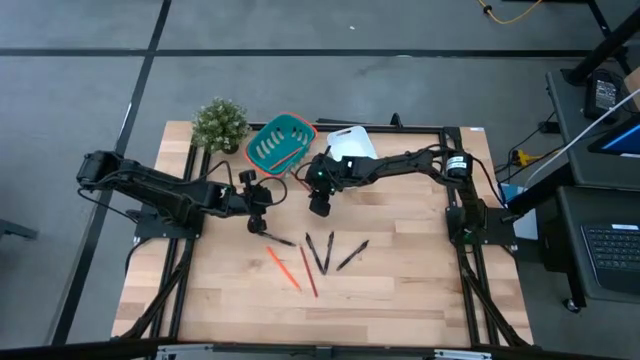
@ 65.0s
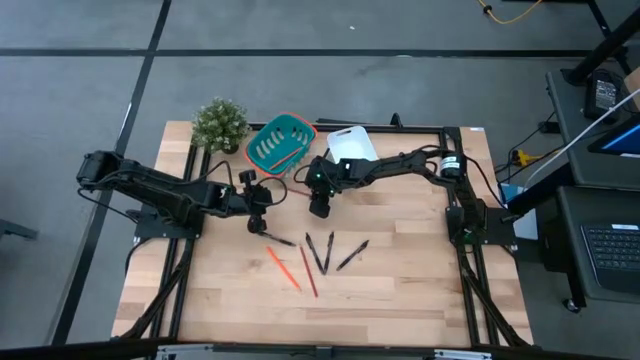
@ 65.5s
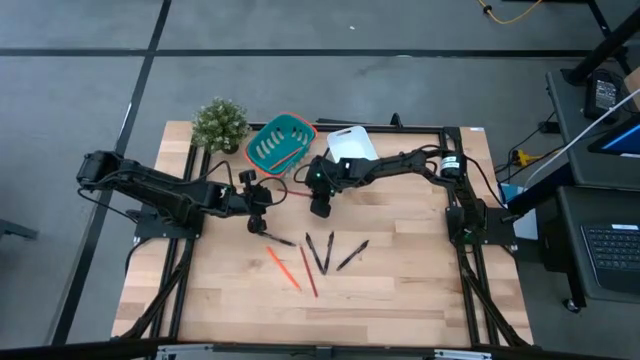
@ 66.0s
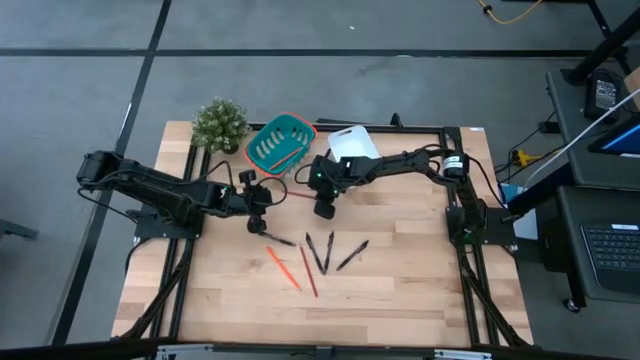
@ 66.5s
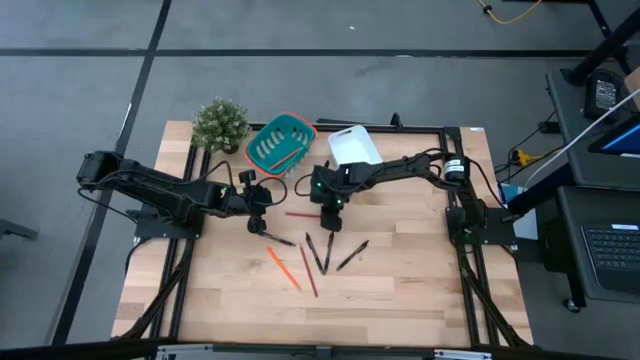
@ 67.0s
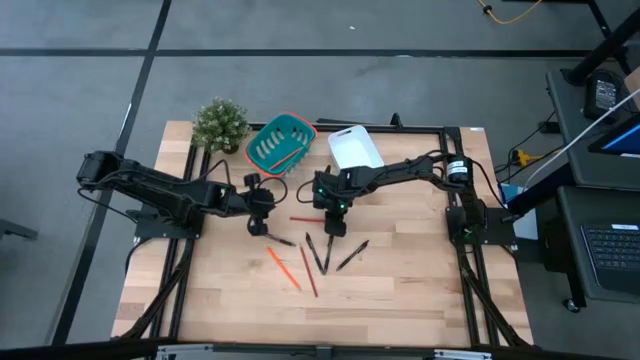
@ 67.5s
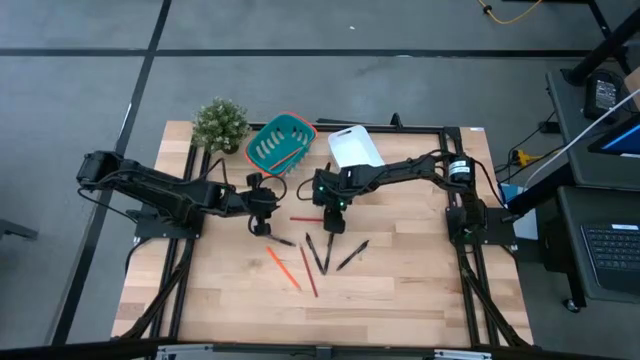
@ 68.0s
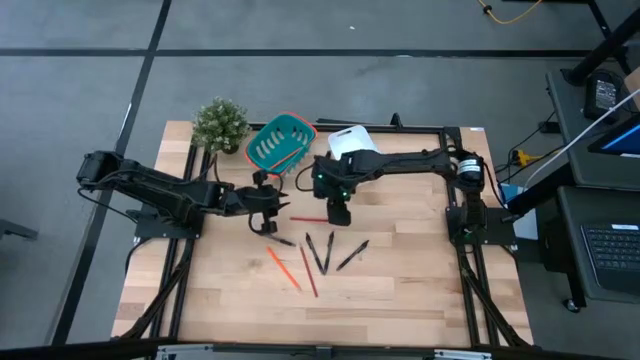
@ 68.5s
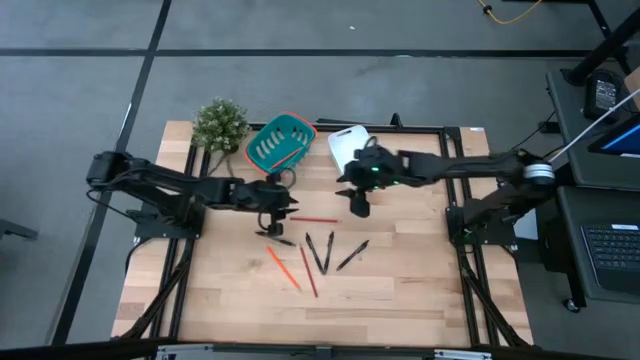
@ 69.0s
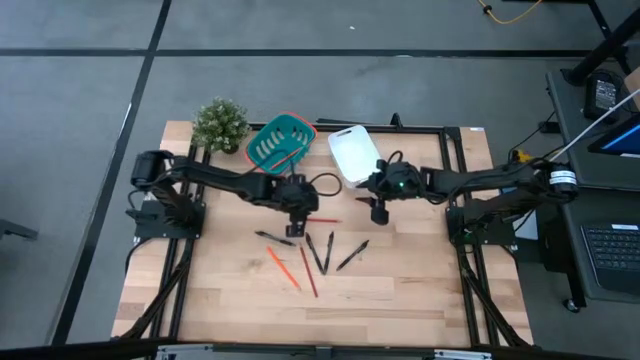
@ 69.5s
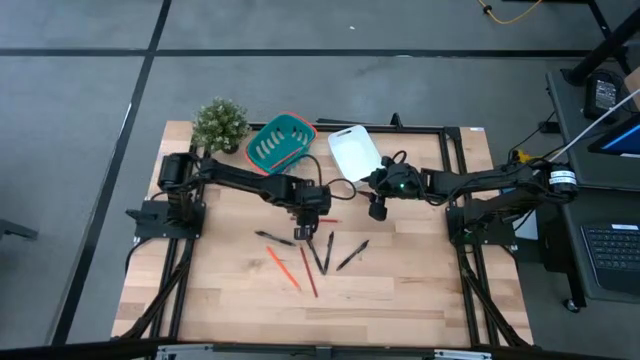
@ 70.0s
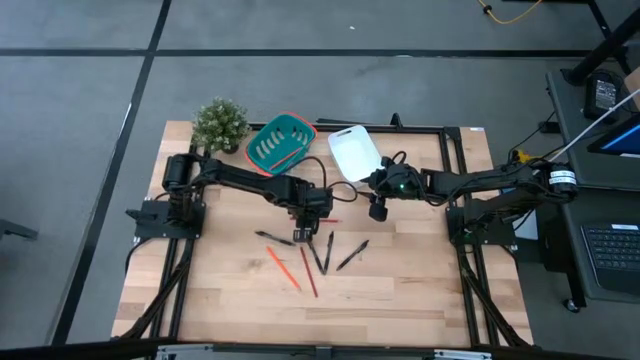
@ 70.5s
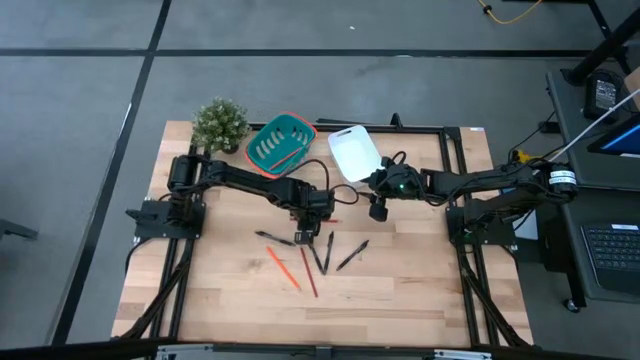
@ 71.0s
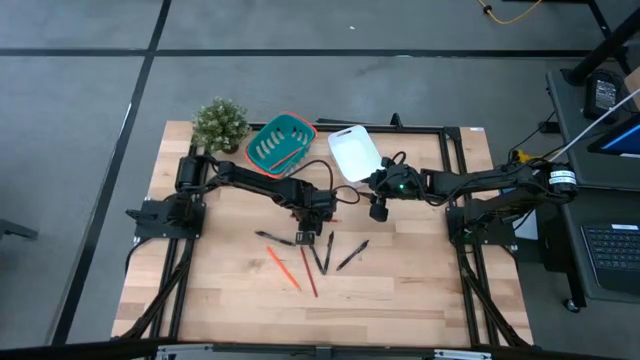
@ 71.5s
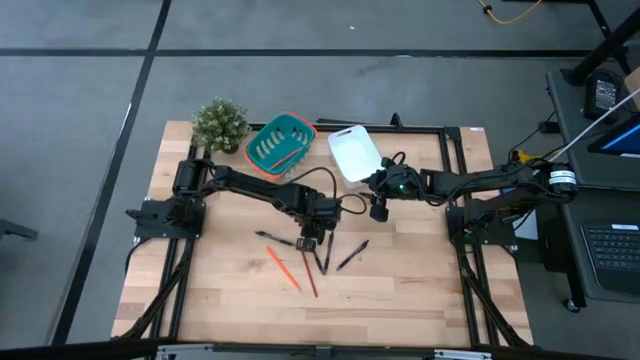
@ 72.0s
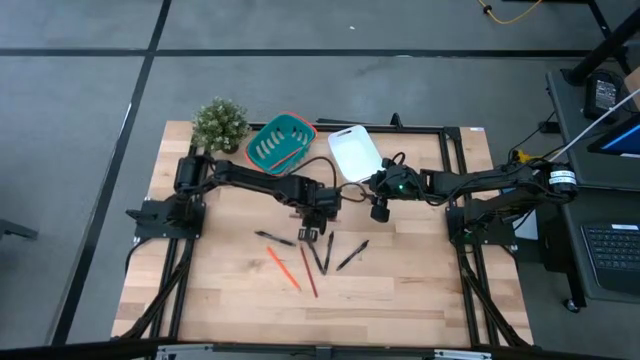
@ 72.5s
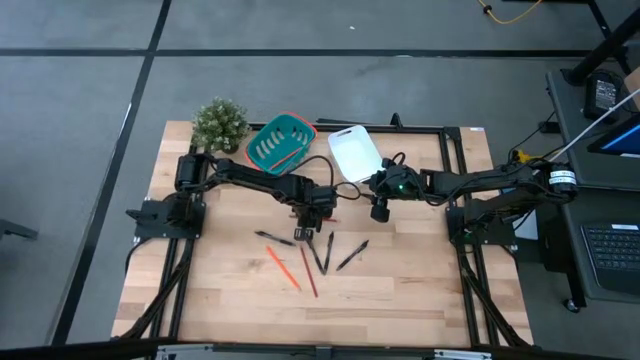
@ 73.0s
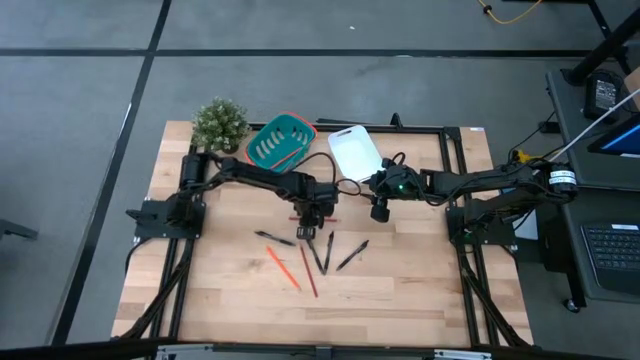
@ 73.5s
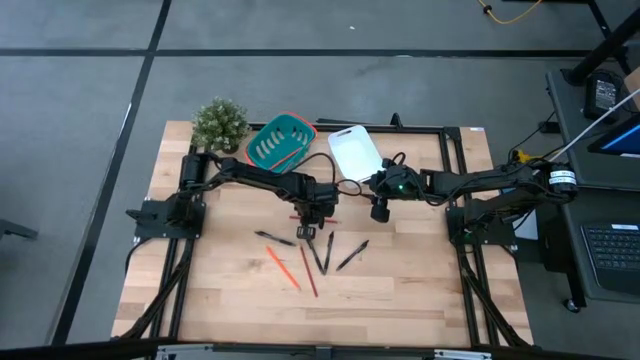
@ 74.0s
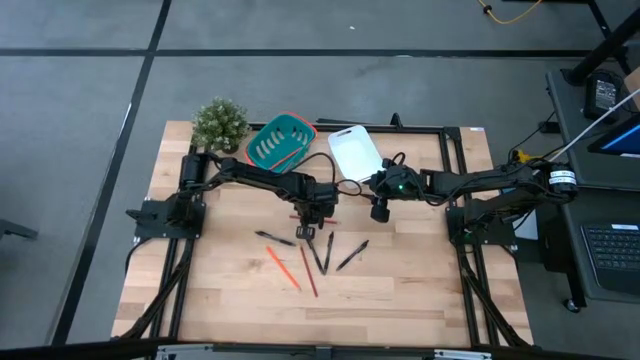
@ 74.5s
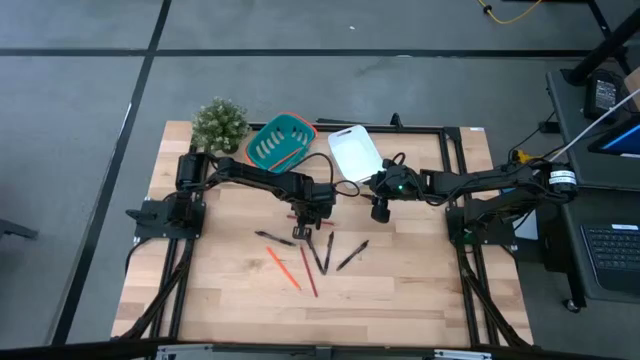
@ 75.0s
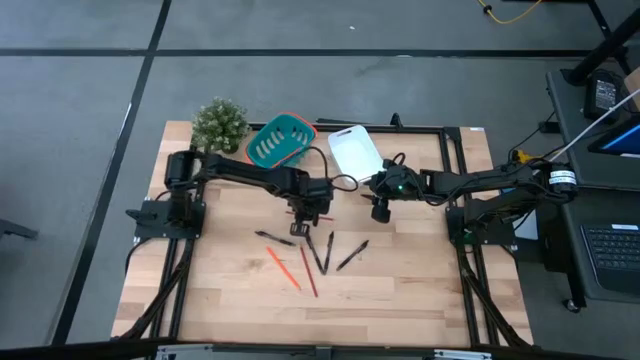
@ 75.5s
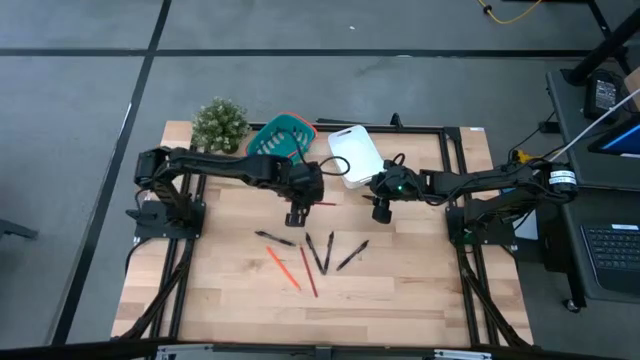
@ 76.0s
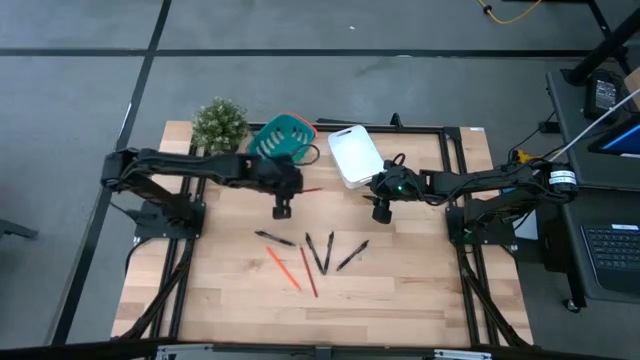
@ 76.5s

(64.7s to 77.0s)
Task: Sort pens & pencils
Put the red pencil into the green basket

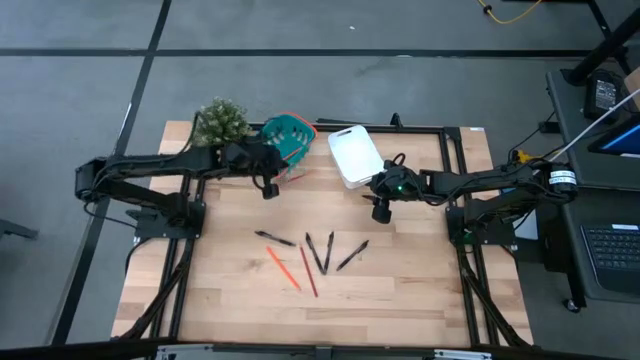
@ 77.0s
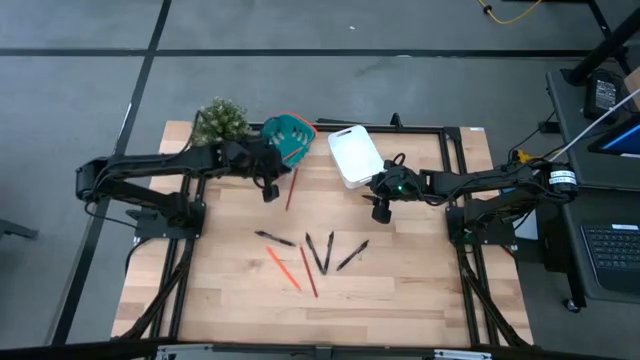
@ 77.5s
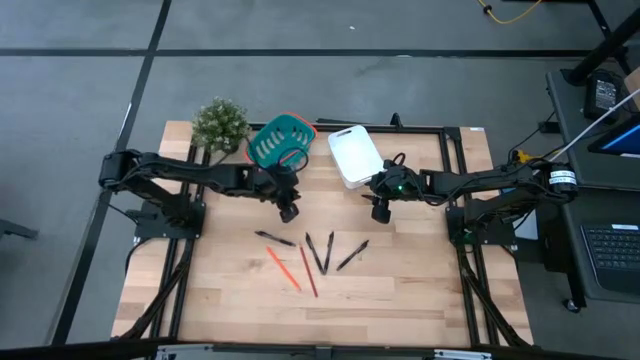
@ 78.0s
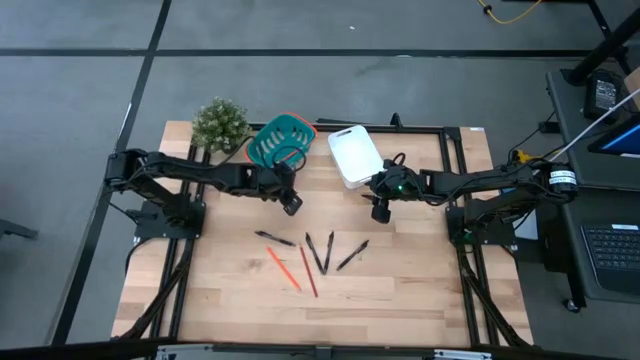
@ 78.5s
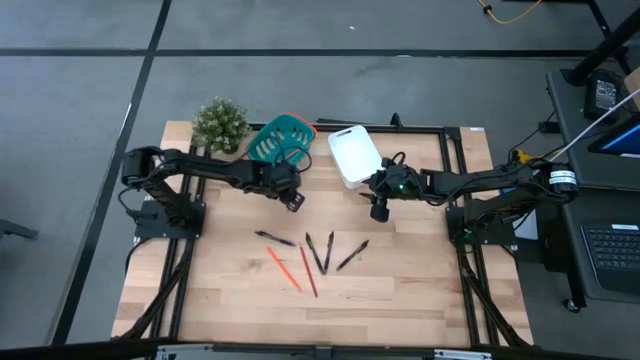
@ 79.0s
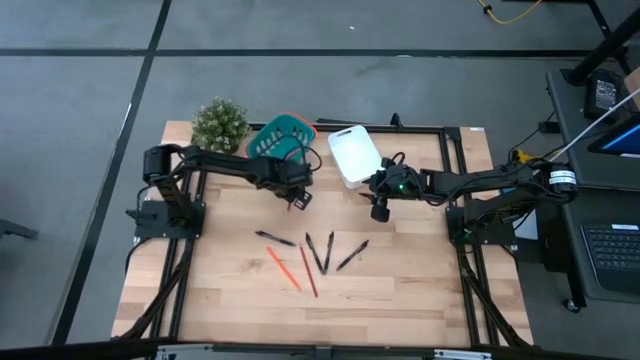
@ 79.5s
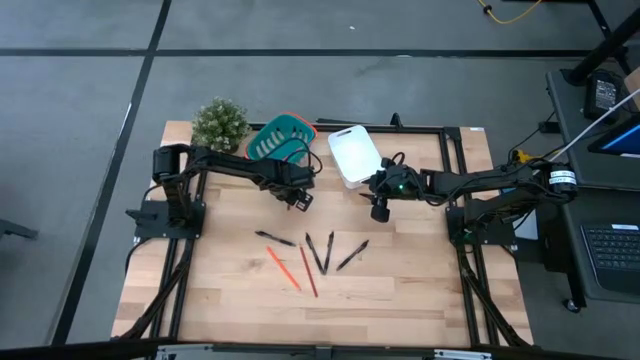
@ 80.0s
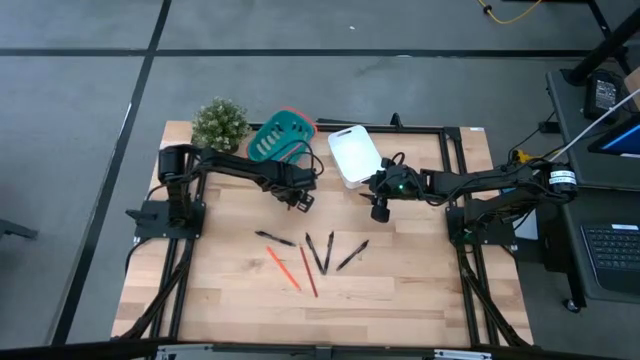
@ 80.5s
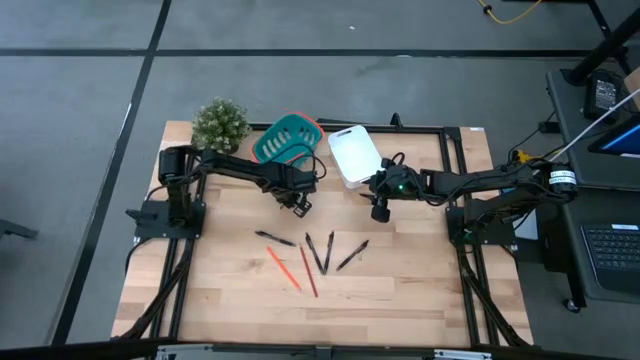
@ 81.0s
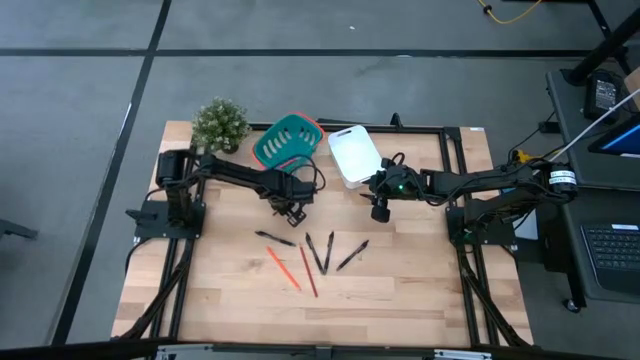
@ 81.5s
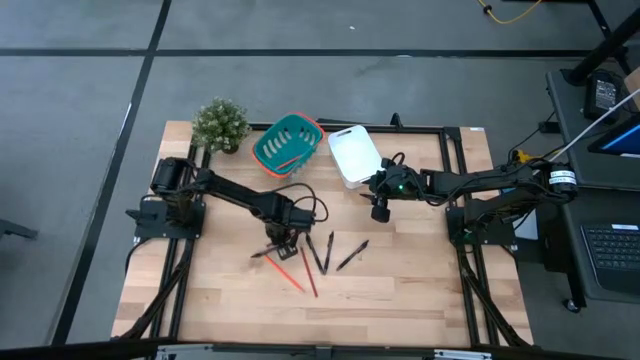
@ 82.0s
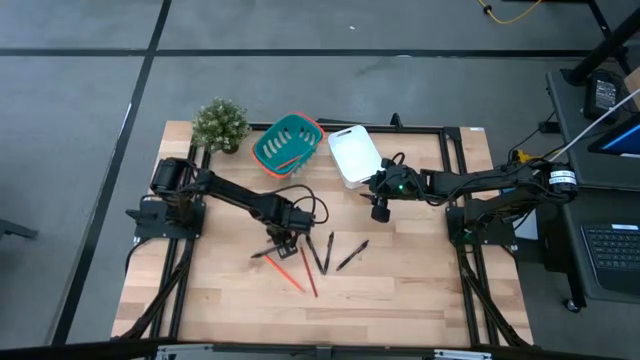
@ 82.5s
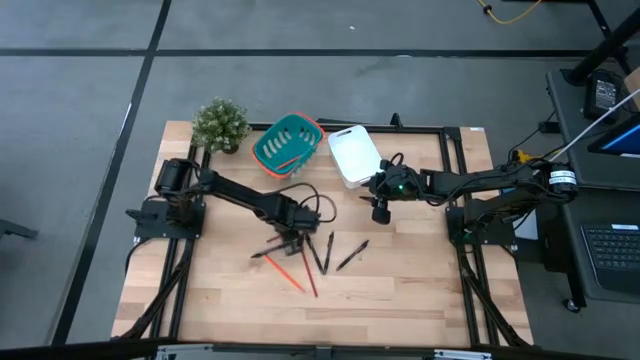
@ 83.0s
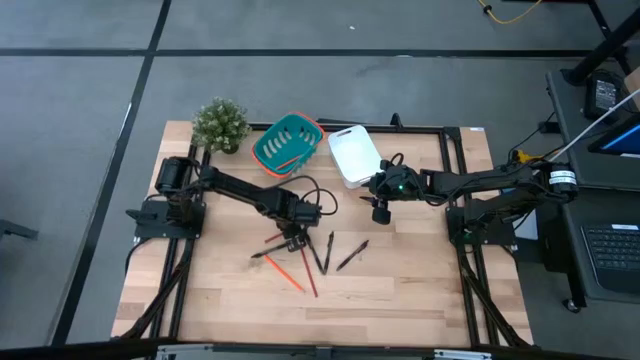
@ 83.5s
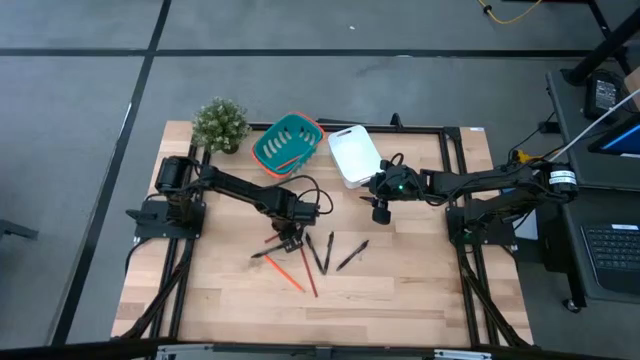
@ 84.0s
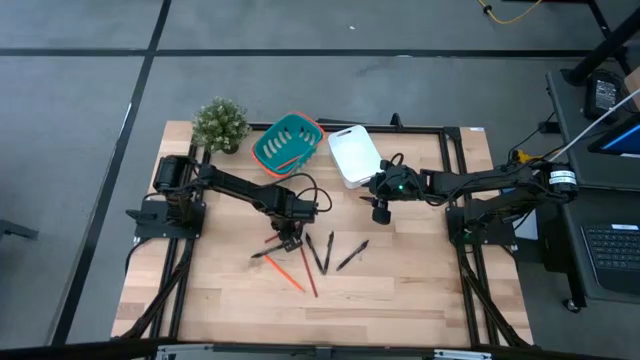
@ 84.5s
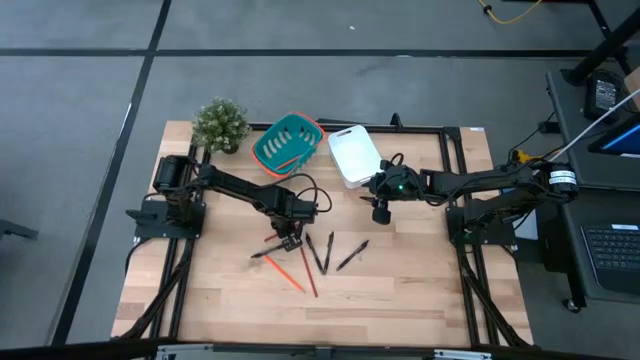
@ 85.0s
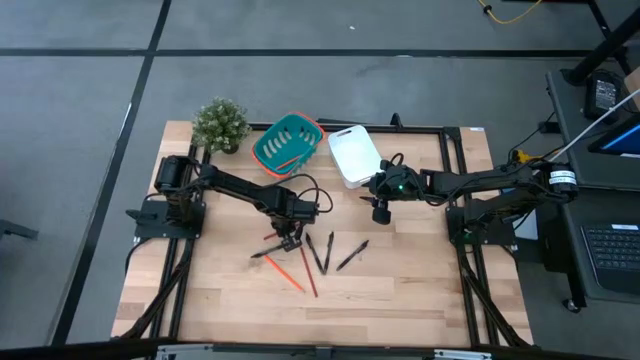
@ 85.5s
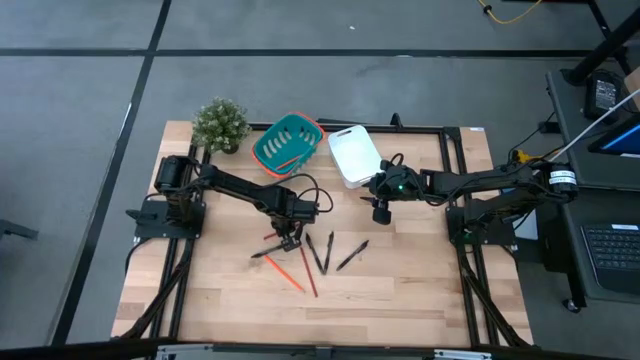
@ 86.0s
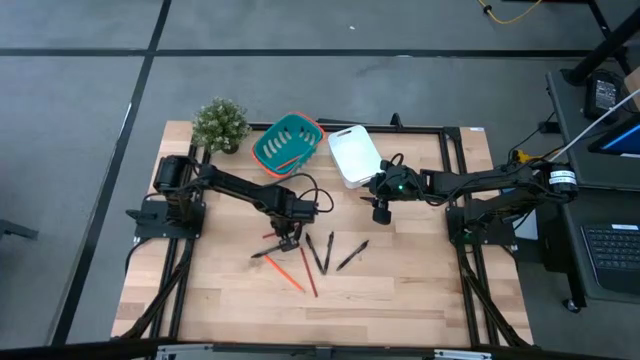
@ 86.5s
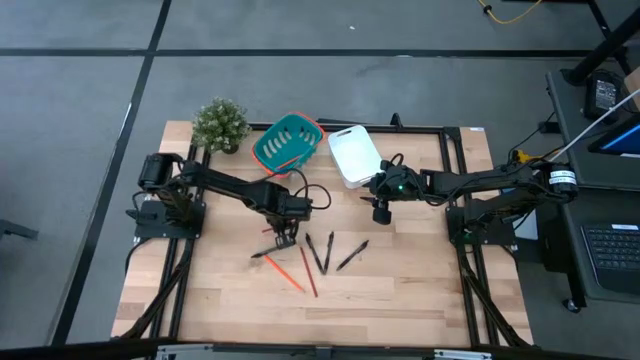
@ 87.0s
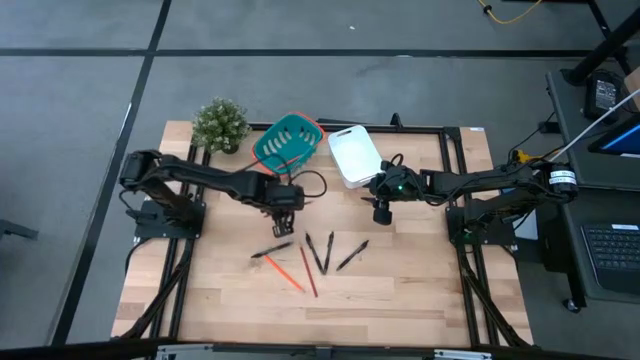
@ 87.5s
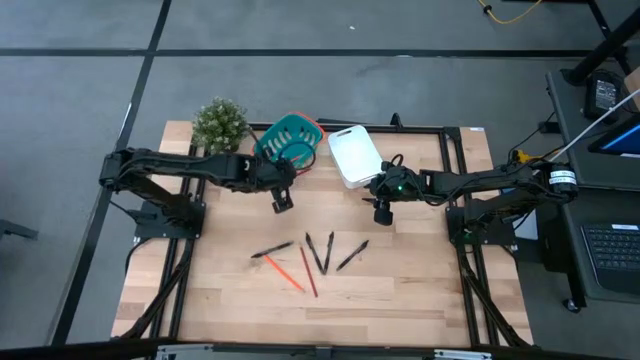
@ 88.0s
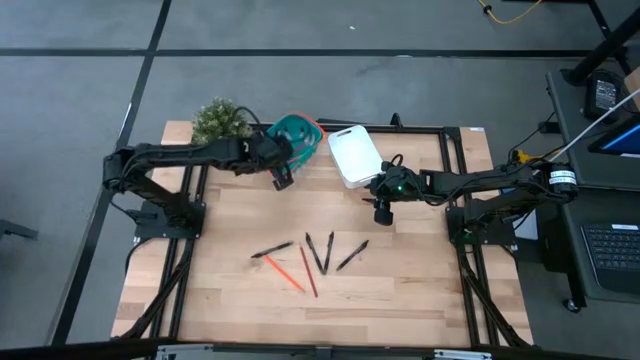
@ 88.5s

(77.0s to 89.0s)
Put the red pencil into the green basket
